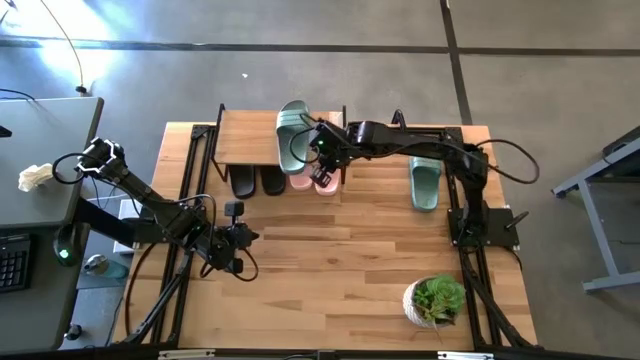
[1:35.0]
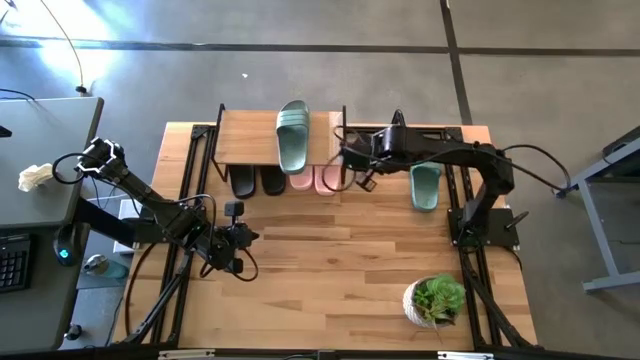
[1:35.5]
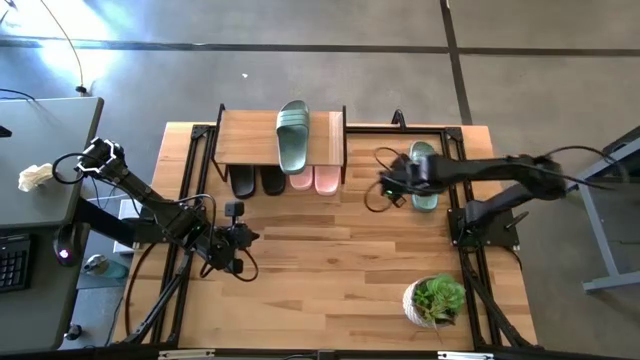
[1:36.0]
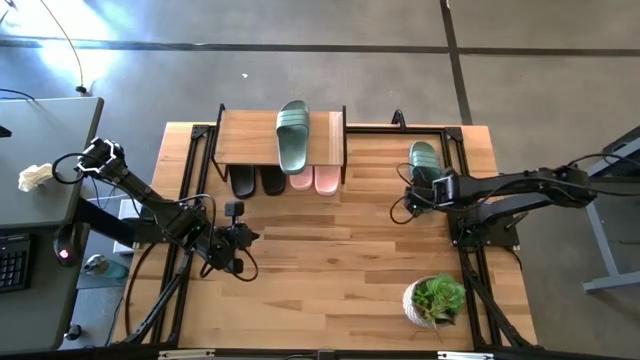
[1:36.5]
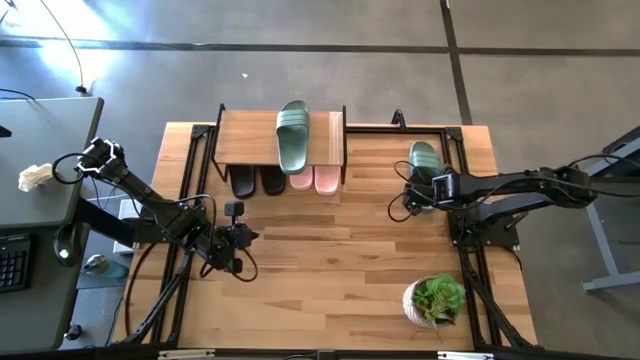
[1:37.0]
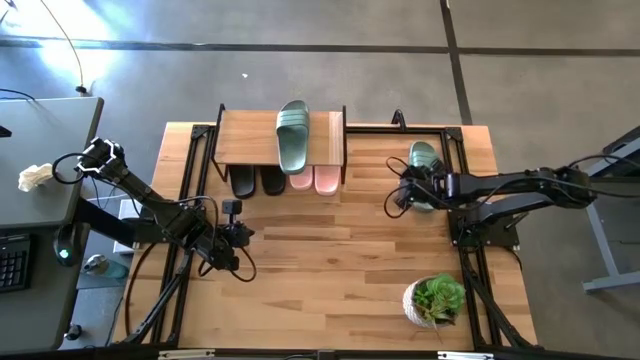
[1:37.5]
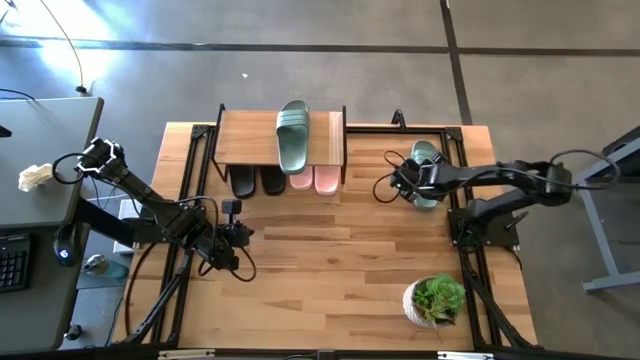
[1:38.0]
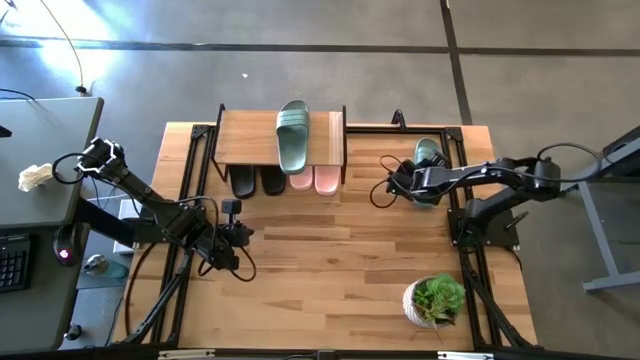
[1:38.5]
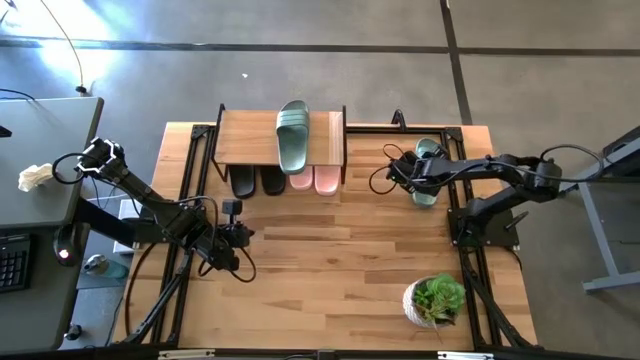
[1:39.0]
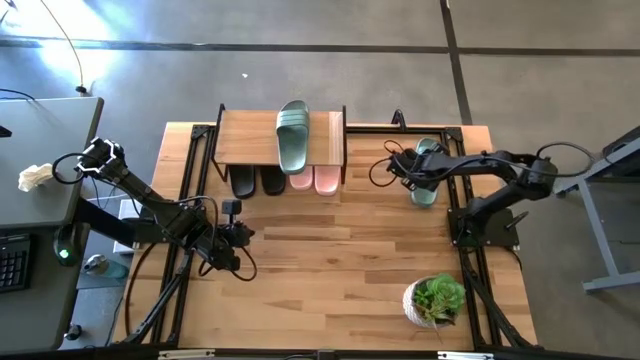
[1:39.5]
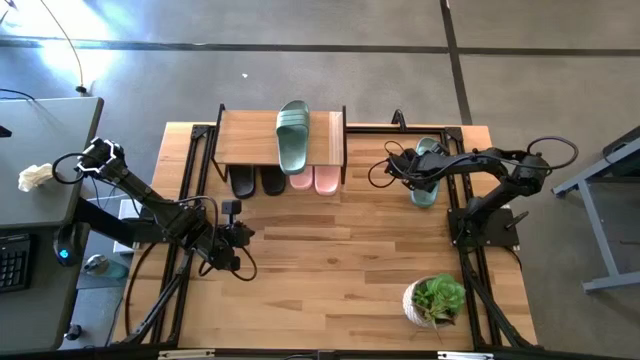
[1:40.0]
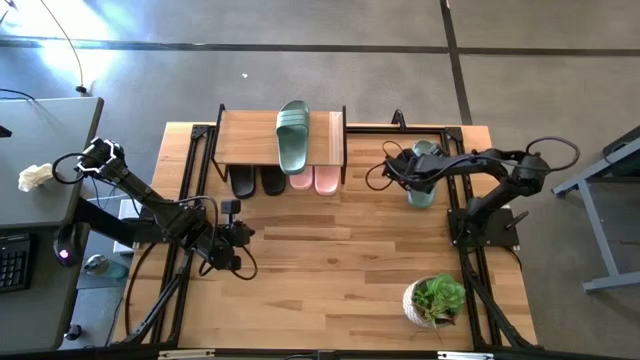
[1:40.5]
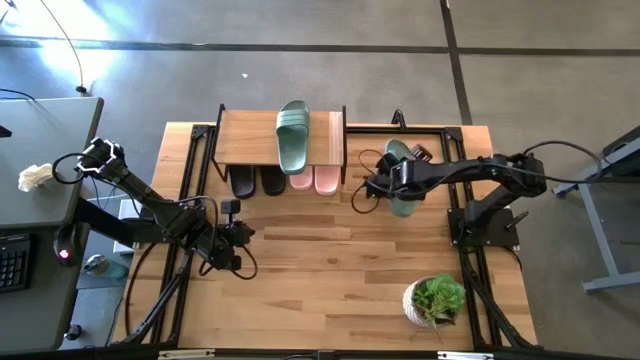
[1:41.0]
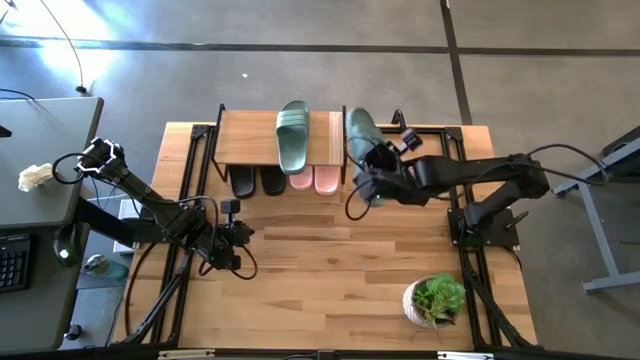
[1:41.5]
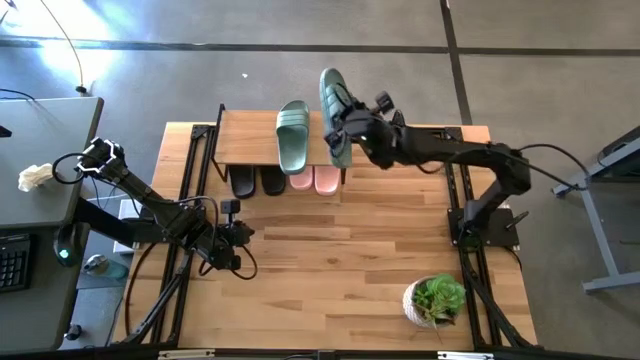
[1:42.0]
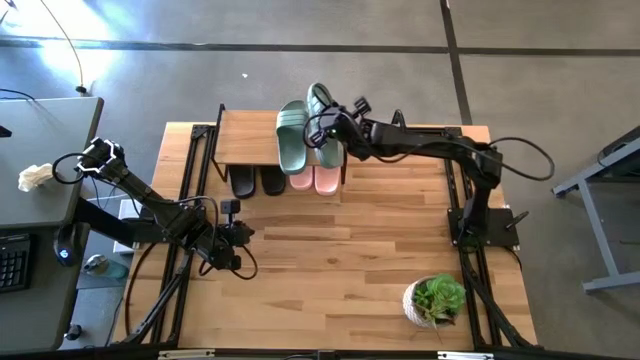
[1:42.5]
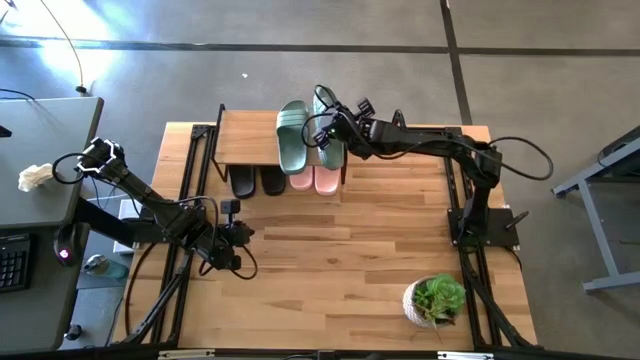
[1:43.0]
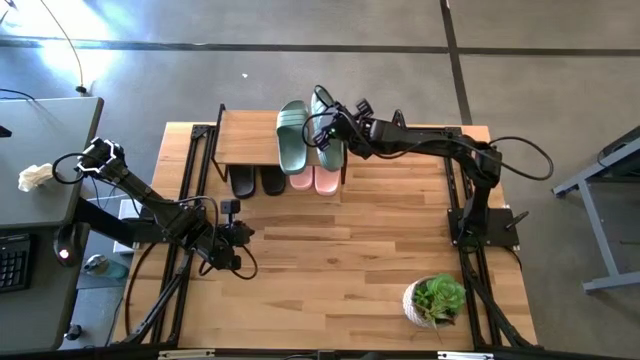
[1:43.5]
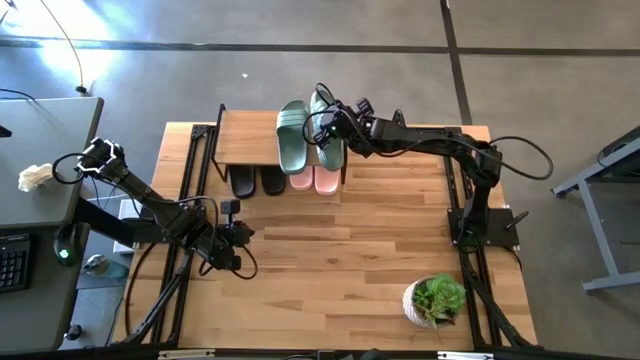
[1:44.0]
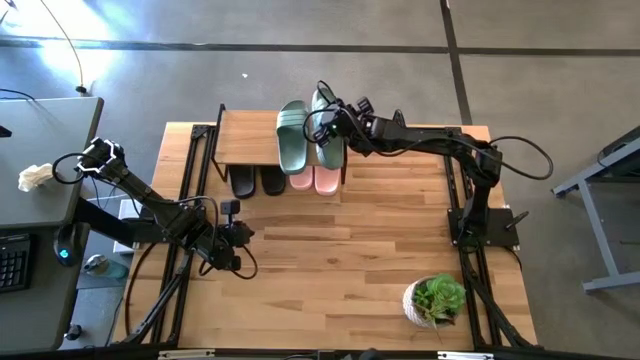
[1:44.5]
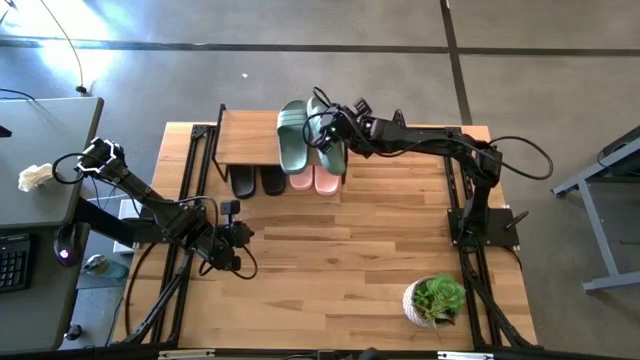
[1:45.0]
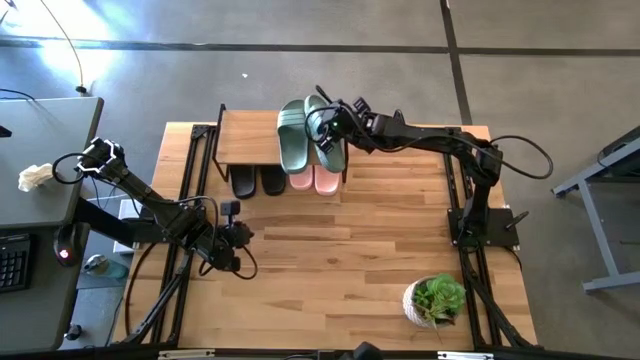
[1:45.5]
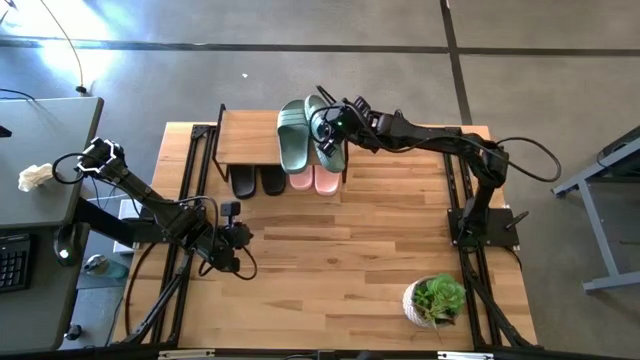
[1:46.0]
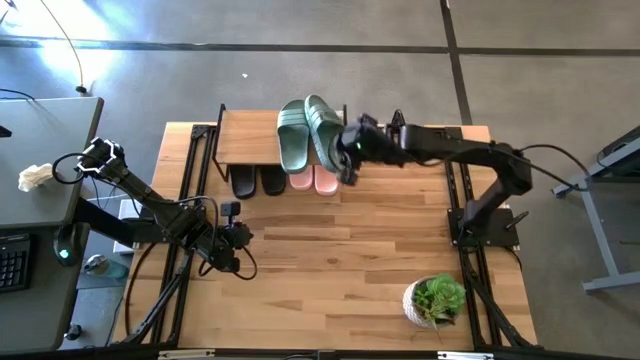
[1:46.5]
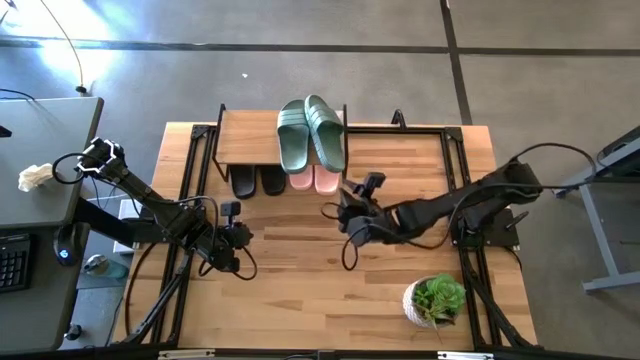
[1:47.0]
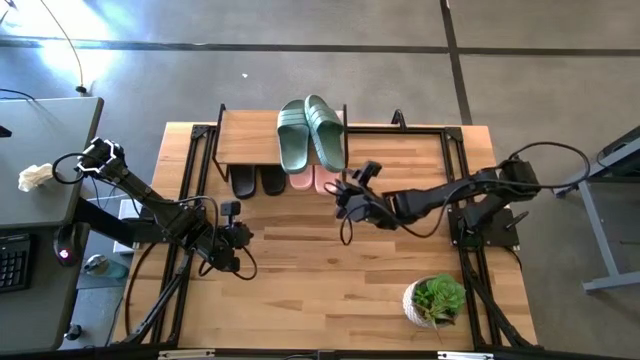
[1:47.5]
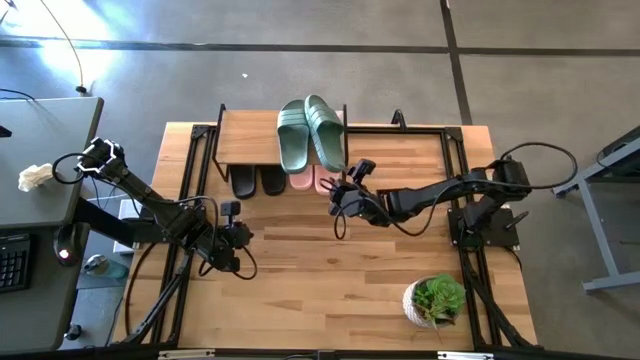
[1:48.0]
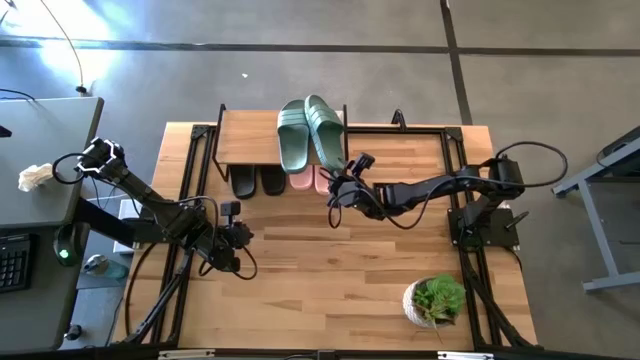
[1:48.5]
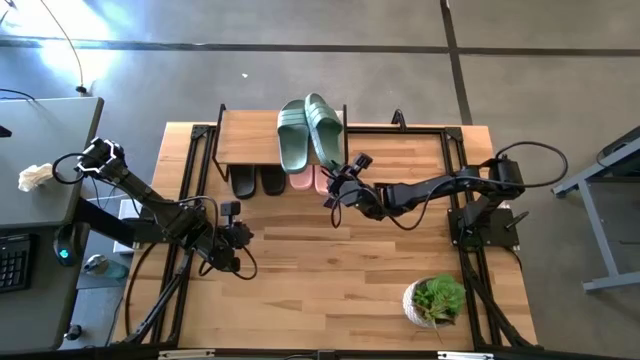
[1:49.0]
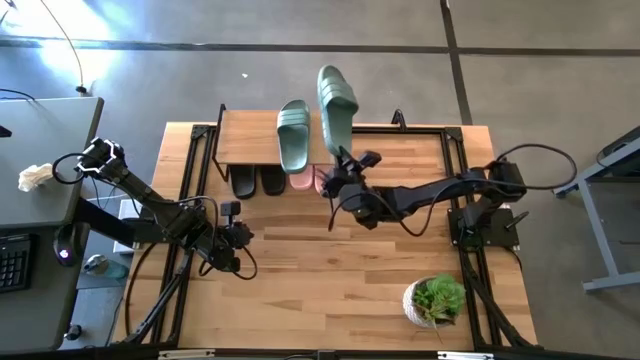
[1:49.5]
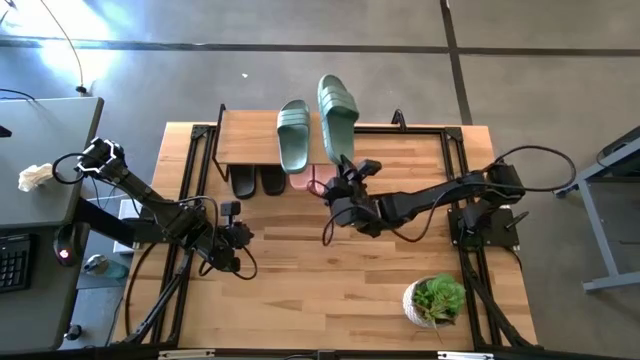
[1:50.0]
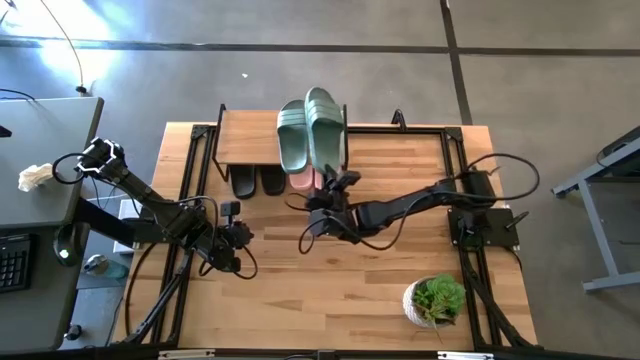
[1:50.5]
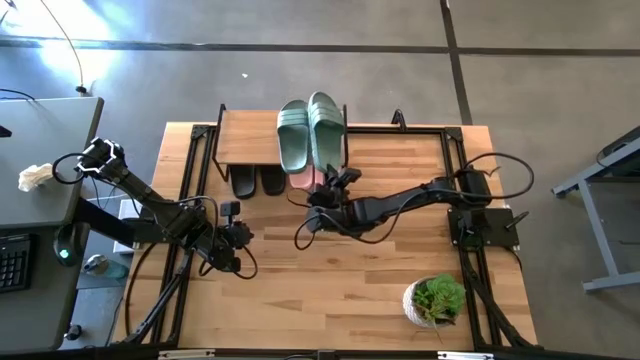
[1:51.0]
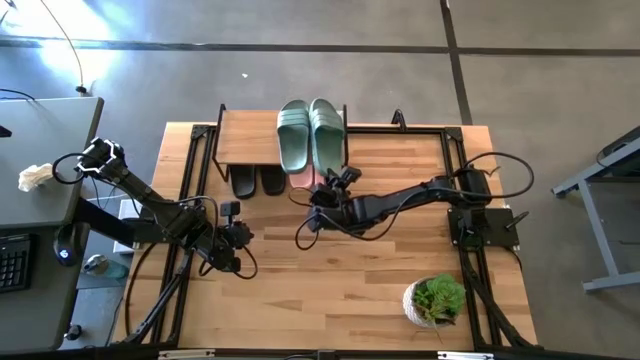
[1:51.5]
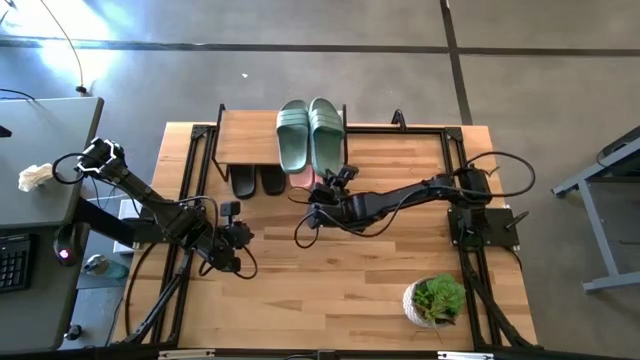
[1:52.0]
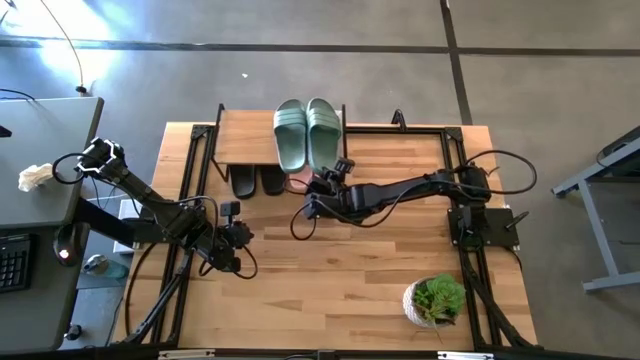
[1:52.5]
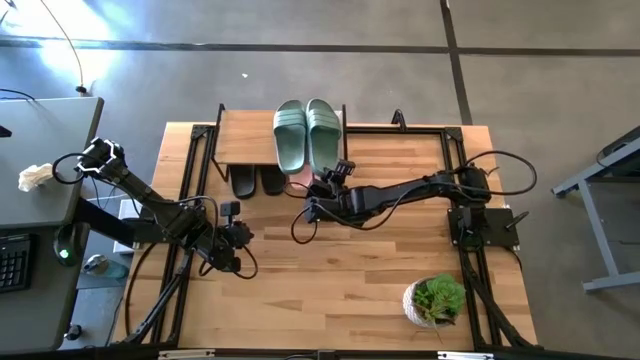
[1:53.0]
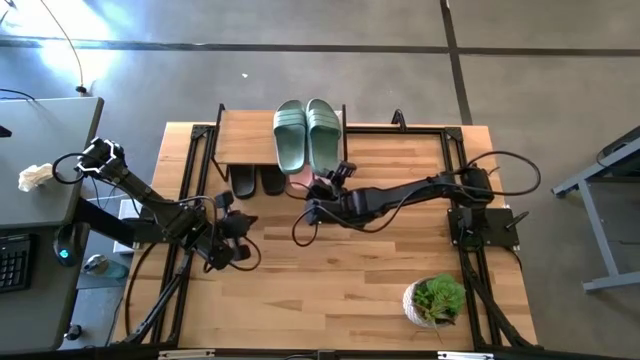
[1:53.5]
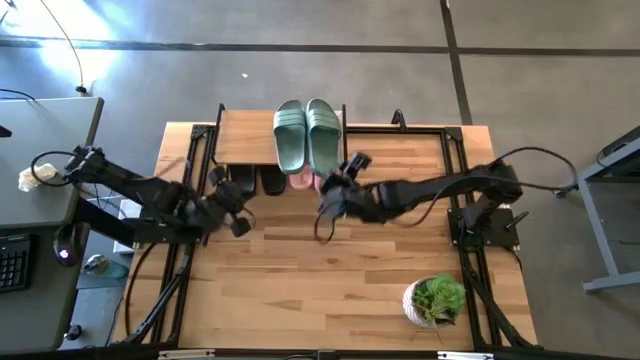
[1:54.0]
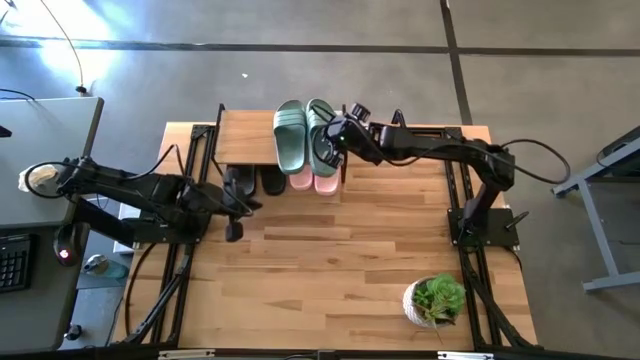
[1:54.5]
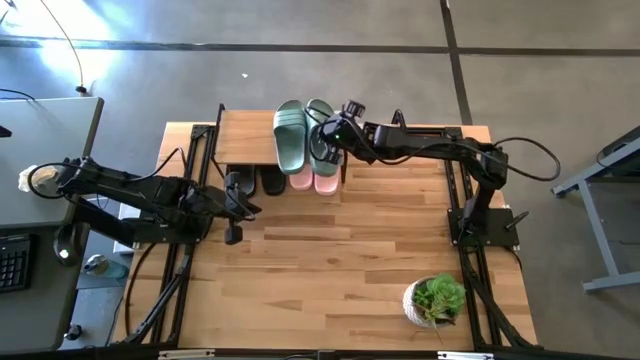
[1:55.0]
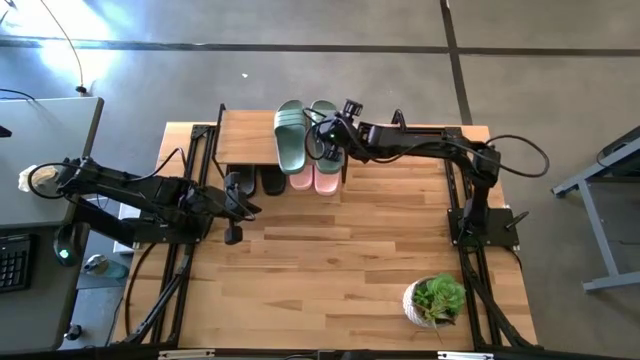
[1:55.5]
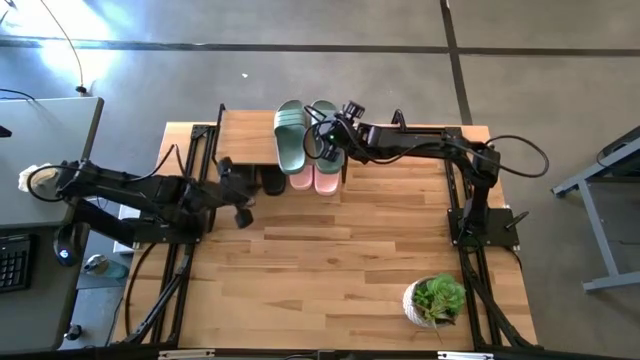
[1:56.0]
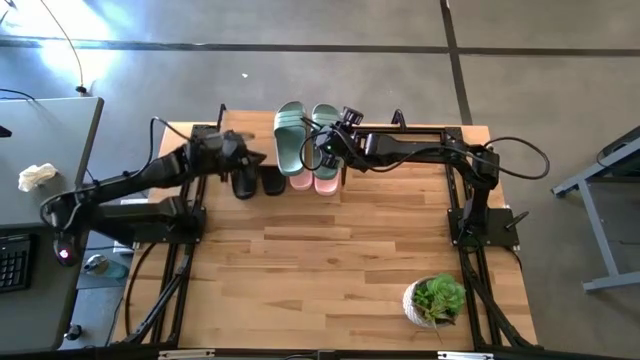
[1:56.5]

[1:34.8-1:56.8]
Task: Pick and place slides into the shelf
Put the green slipper on the shelf
